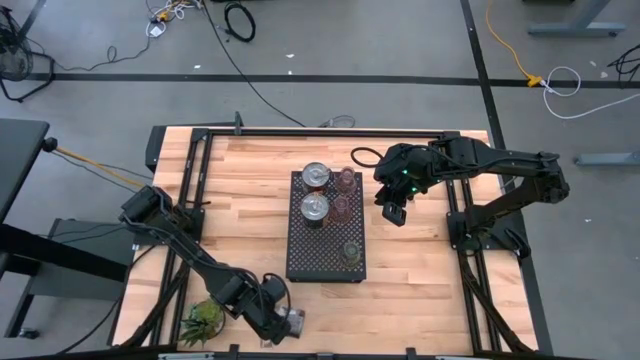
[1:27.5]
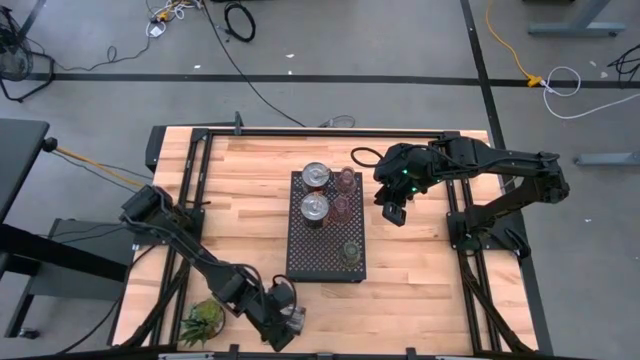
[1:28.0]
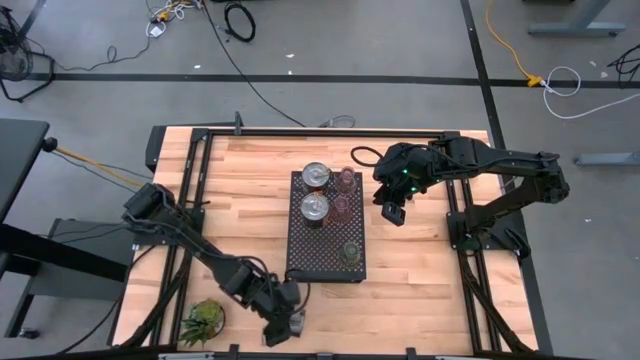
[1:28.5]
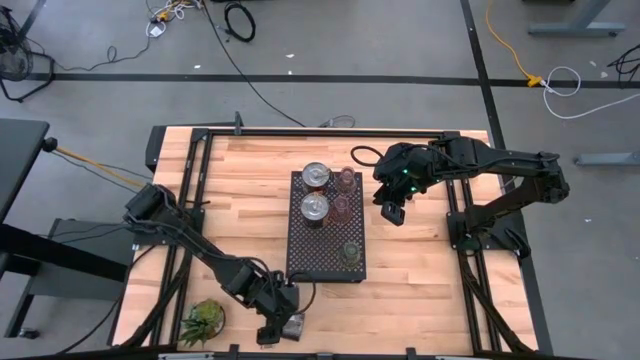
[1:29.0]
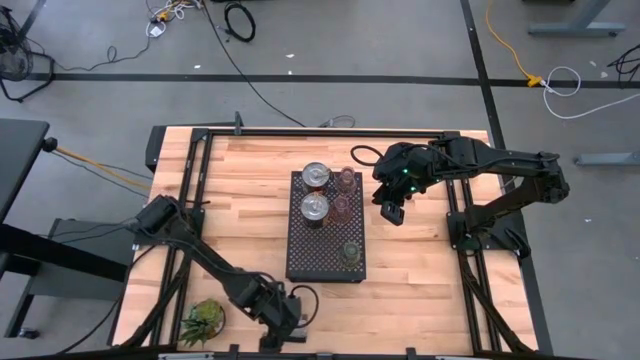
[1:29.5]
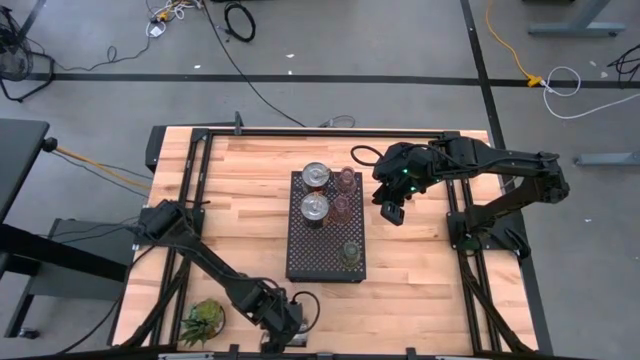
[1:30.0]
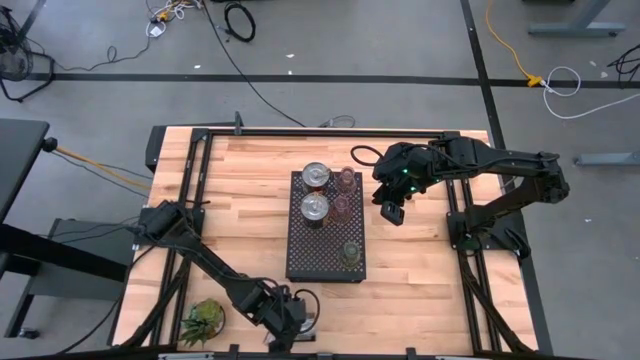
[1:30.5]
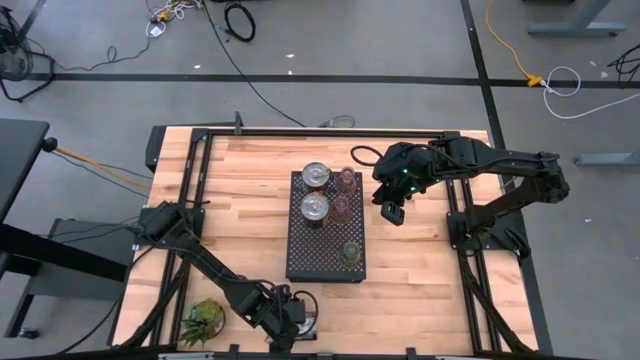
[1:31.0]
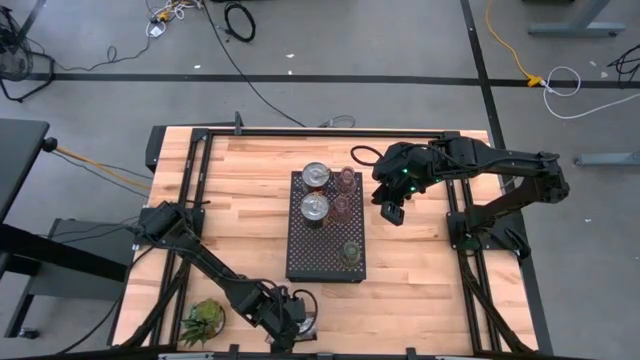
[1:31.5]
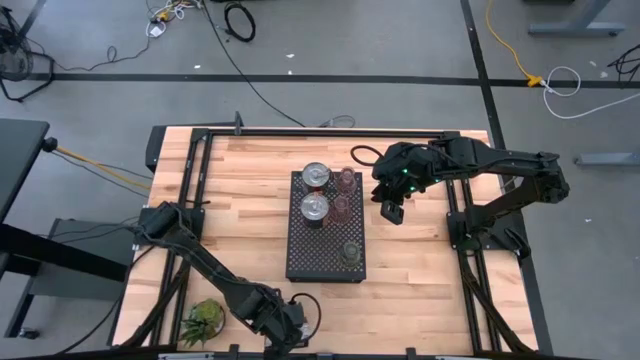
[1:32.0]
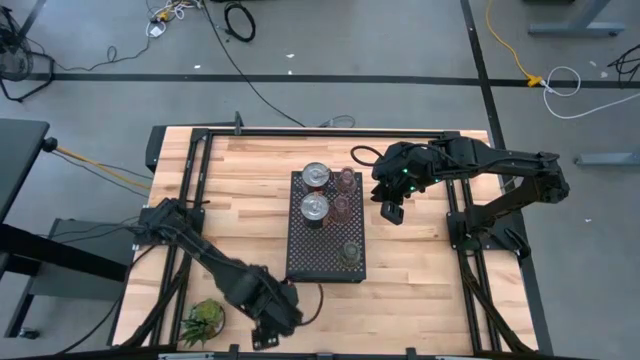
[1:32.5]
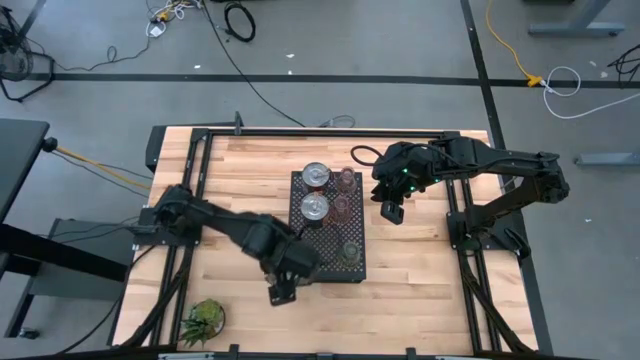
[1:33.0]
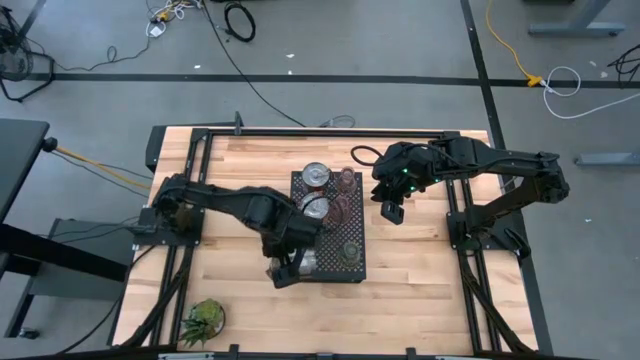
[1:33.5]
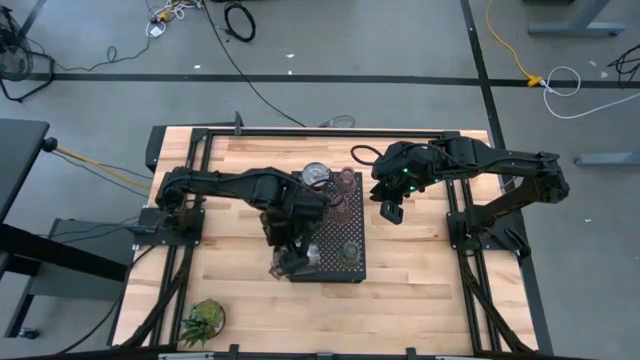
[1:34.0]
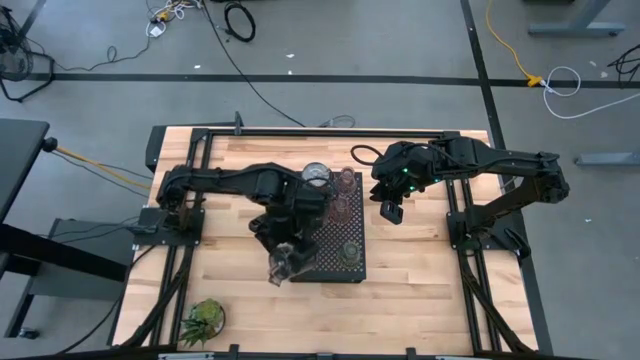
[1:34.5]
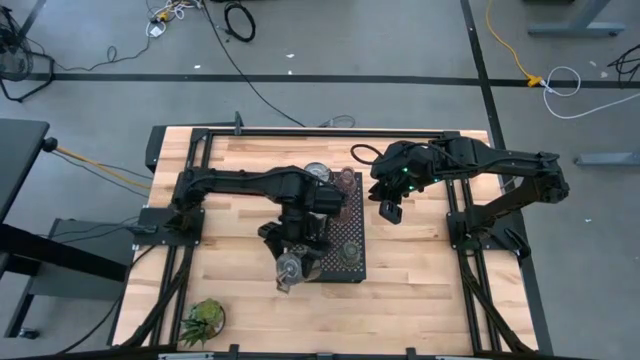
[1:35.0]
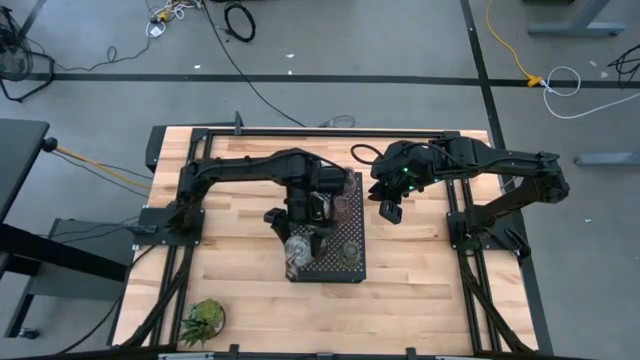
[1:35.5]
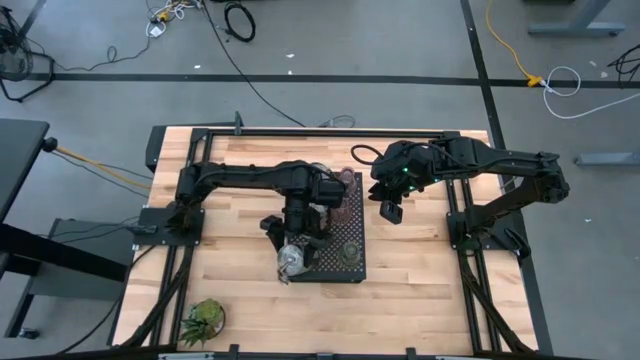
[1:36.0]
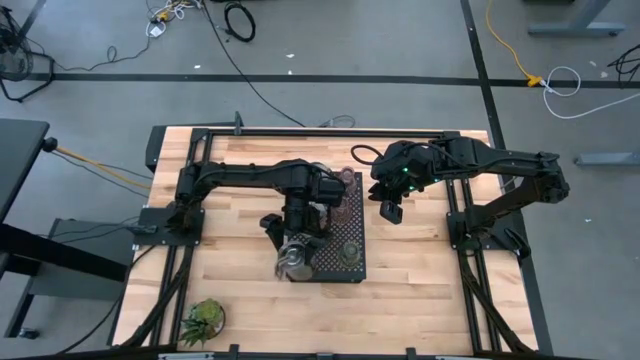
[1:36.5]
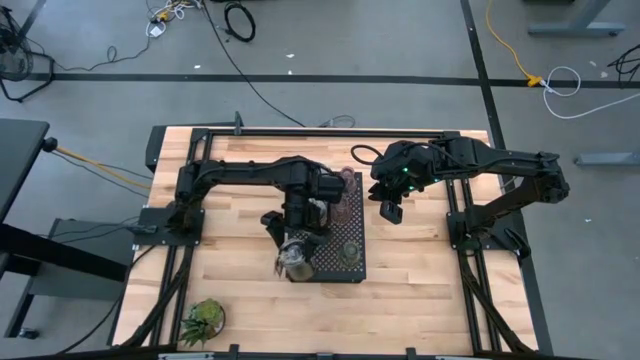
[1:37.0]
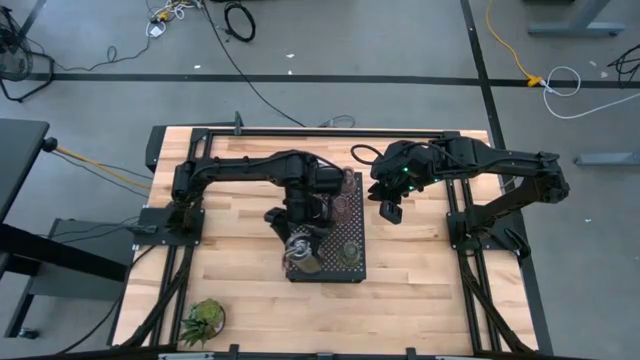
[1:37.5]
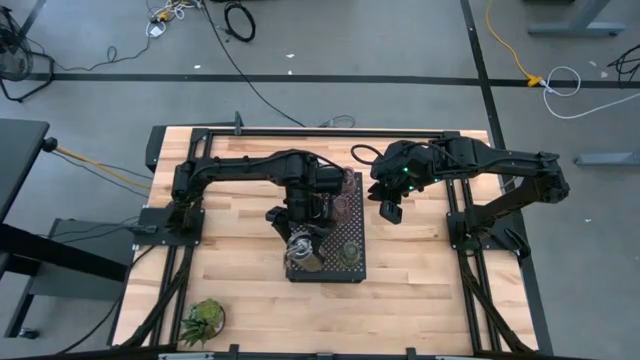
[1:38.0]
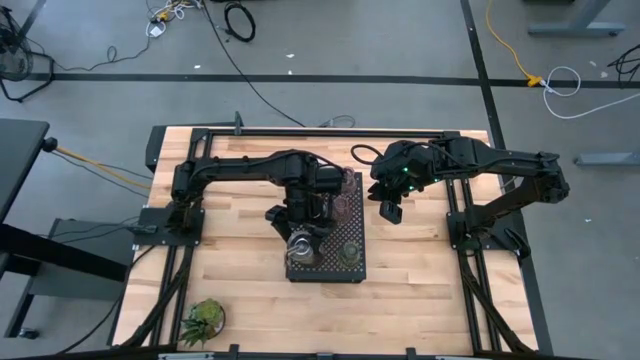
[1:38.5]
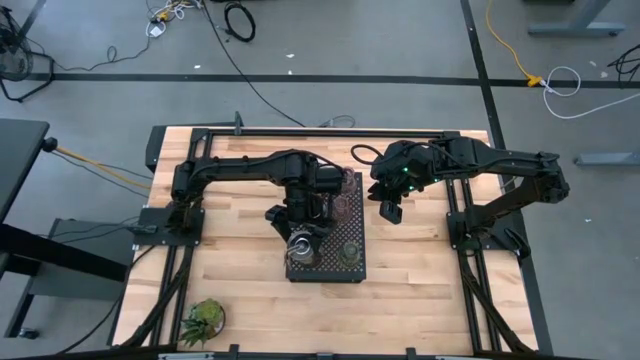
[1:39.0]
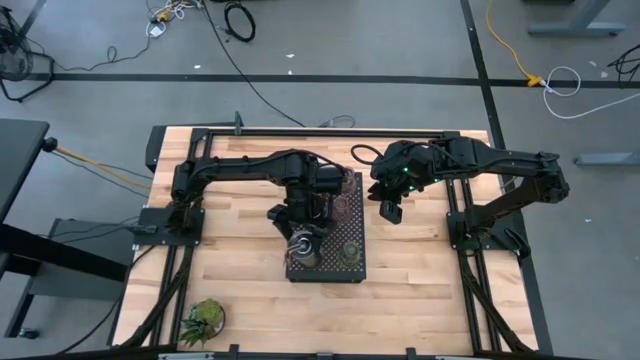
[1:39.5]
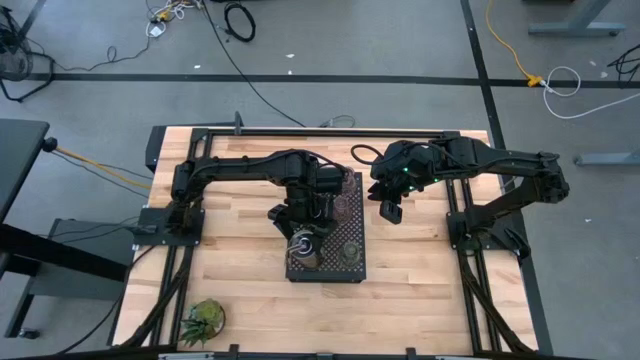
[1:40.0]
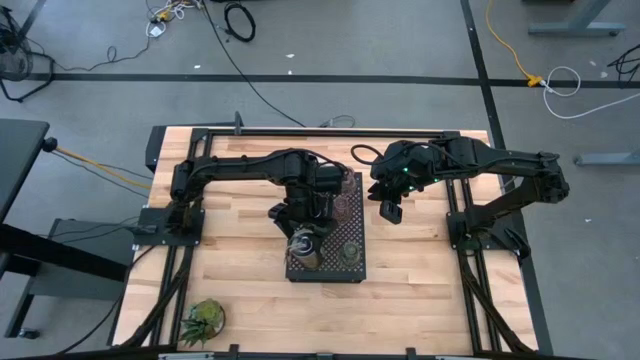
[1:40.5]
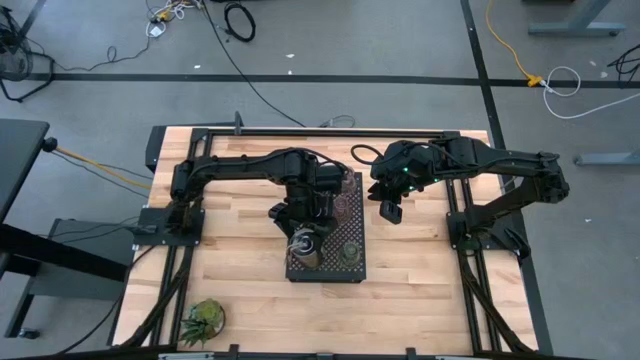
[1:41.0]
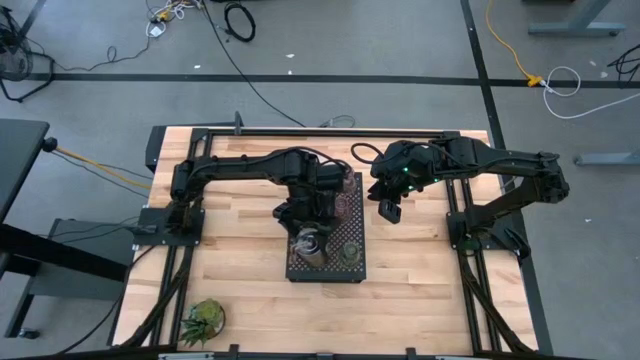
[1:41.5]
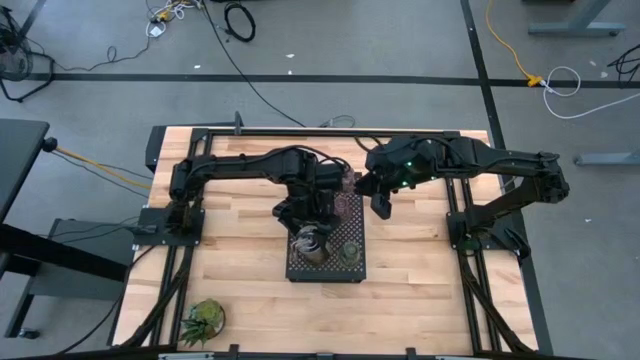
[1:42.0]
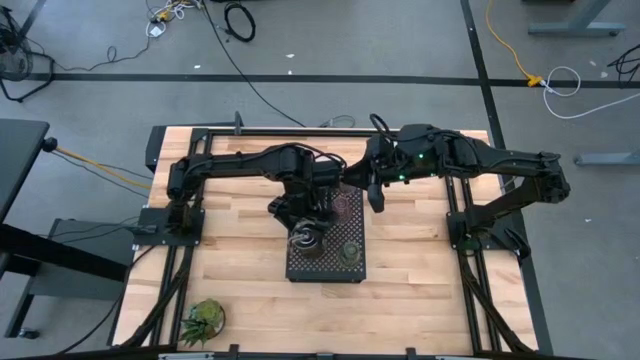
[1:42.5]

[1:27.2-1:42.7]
Task: Pick & Place candle stick holders
Put the silver scented candle on the shelf aligned with the other scented candles

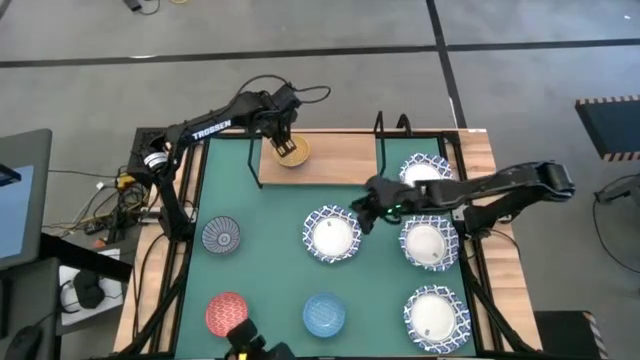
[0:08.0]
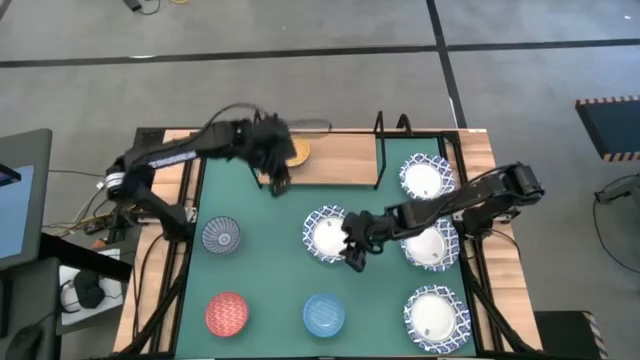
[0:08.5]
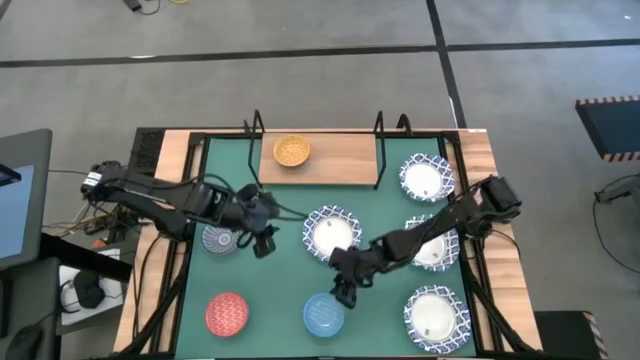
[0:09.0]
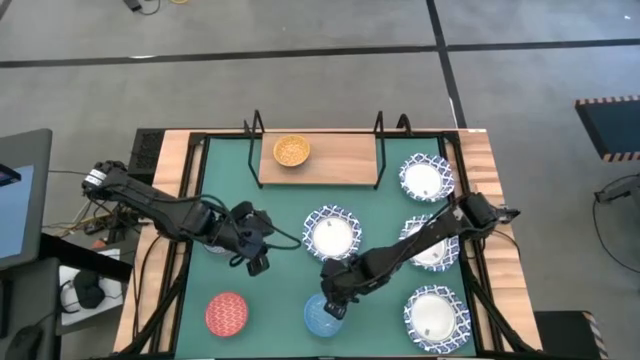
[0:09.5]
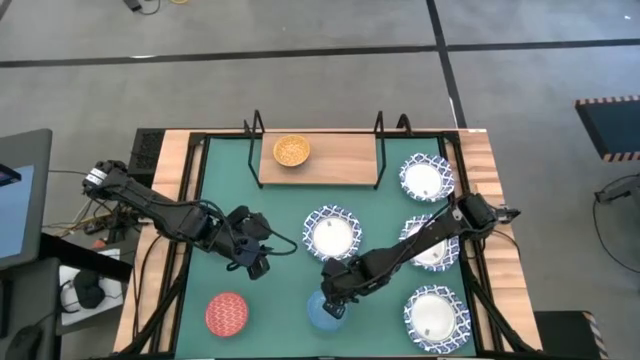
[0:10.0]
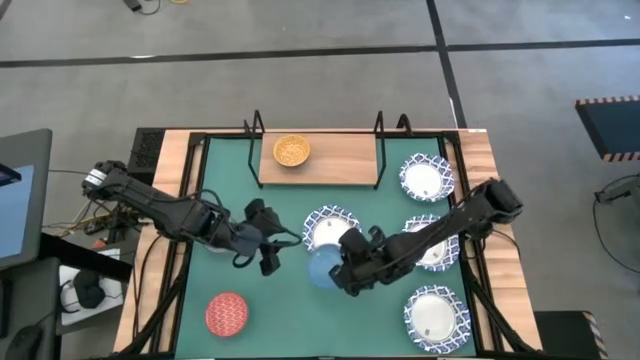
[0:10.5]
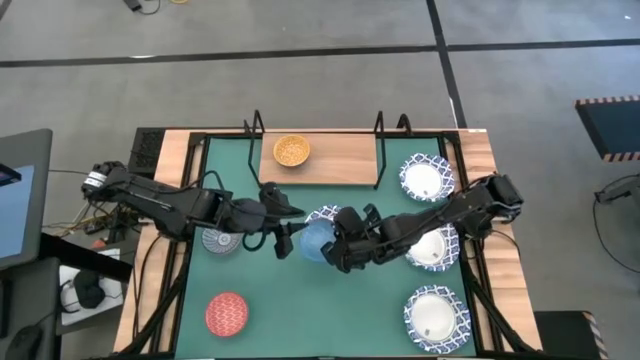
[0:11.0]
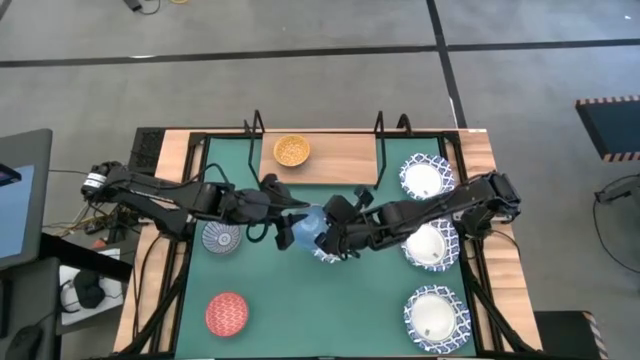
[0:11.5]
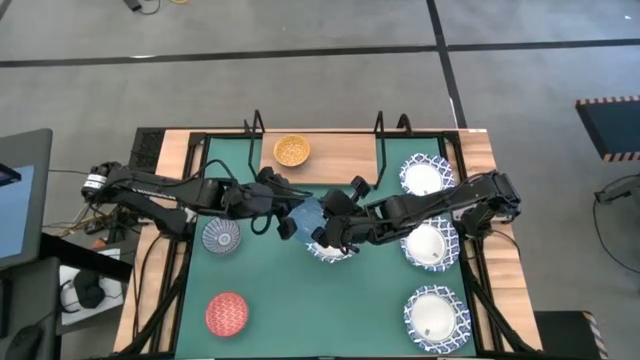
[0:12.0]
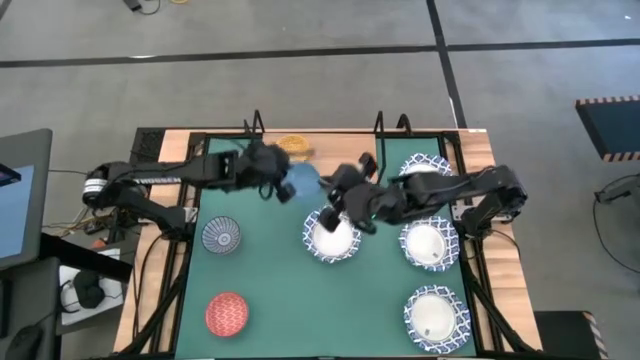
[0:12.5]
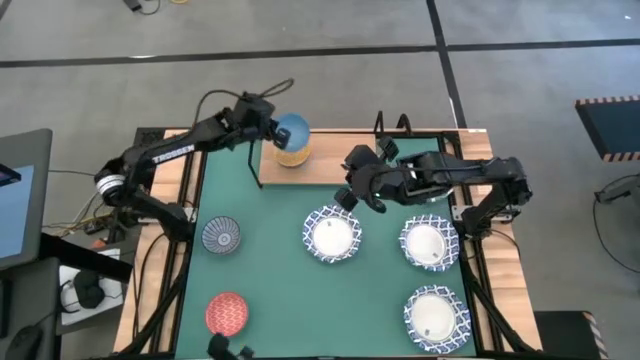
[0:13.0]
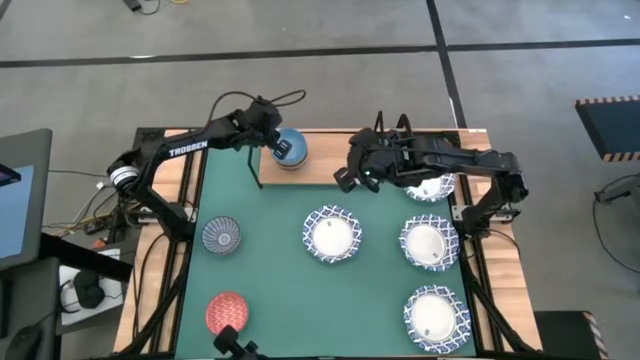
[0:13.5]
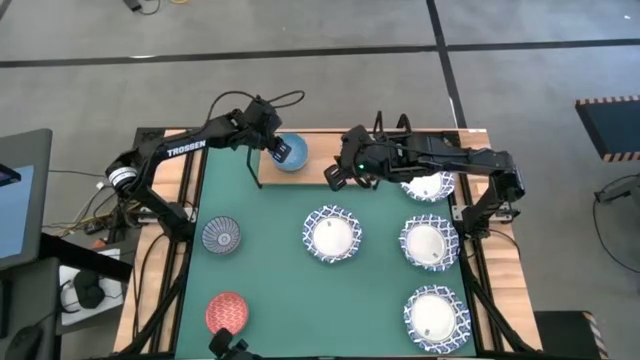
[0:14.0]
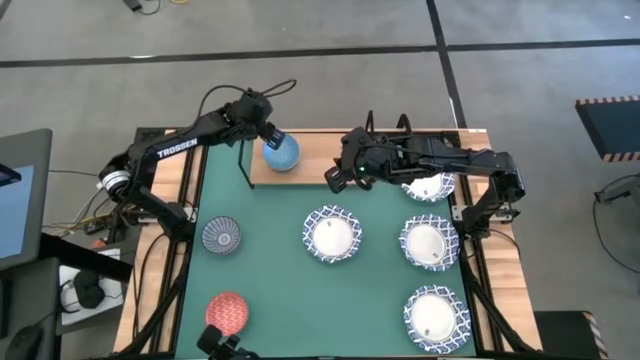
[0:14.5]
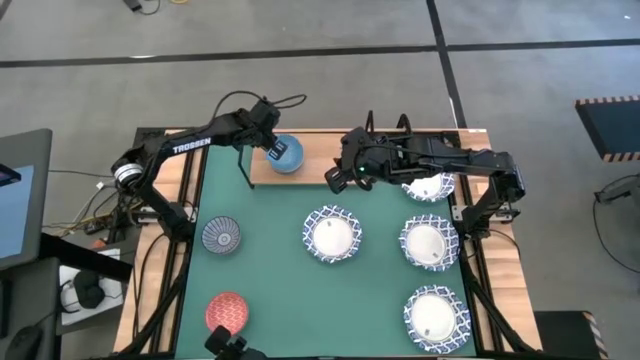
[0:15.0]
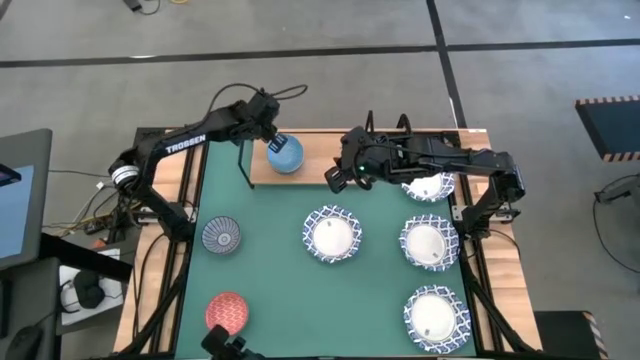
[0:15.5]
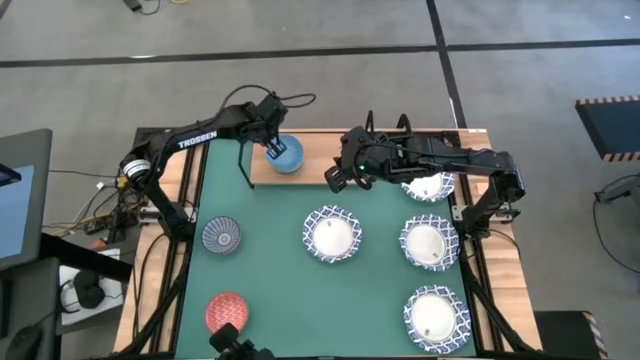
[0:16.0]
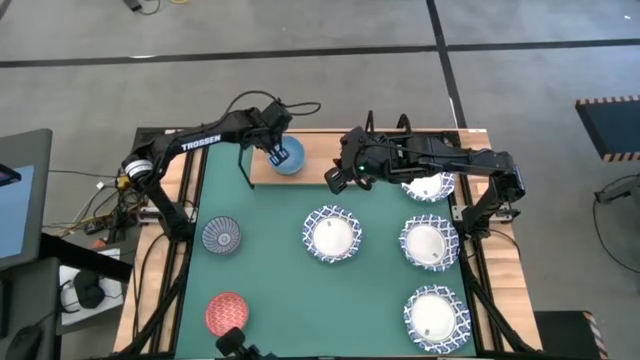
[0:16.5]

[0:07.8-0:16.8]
Task: Place and stack bowls onto a shelf
Stack the small light blue bowl on top of the small yellow bowl on the shelf
